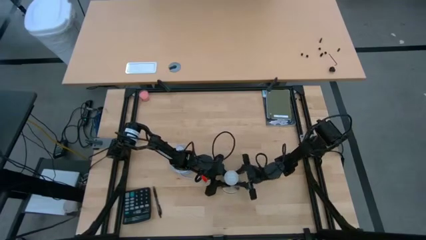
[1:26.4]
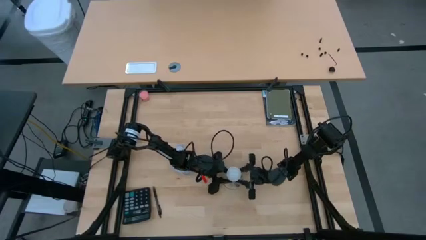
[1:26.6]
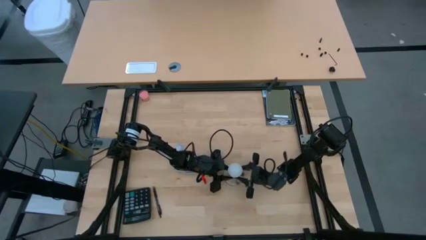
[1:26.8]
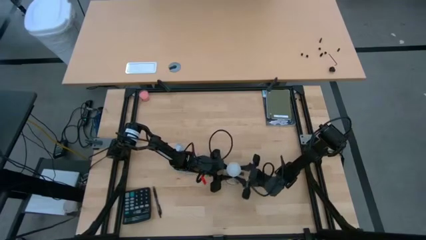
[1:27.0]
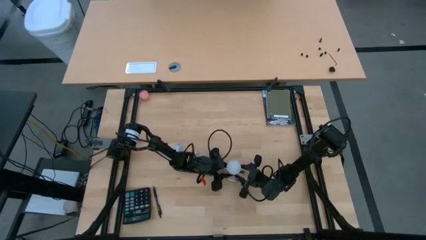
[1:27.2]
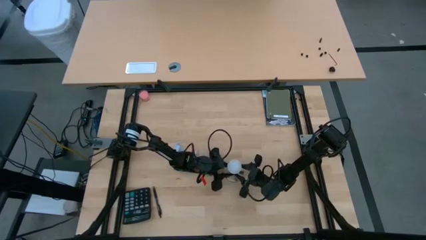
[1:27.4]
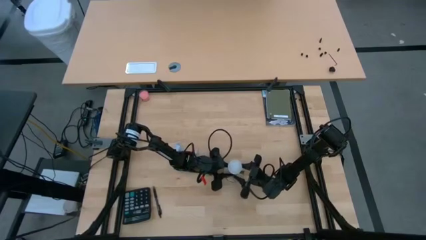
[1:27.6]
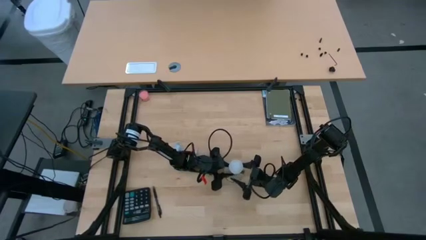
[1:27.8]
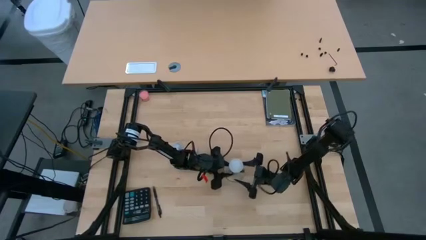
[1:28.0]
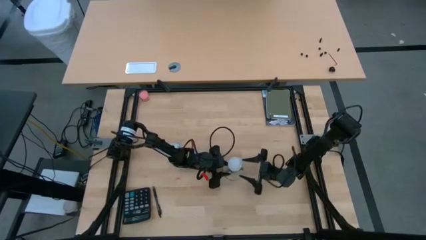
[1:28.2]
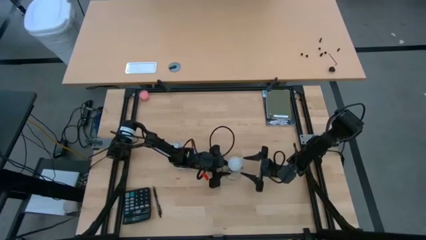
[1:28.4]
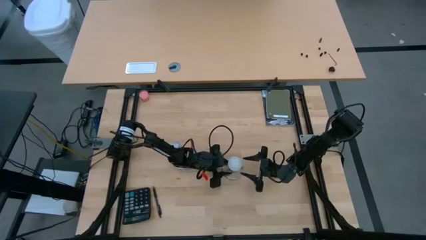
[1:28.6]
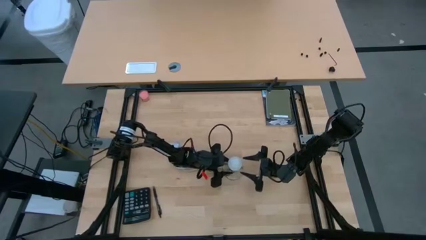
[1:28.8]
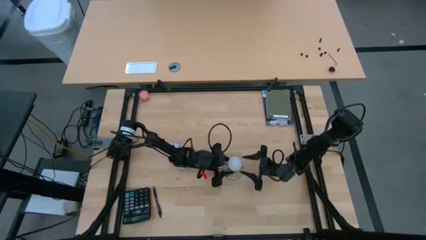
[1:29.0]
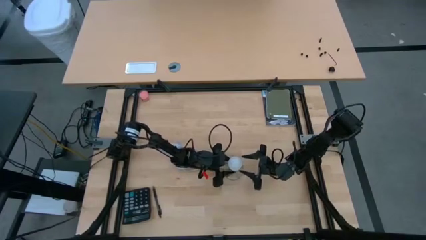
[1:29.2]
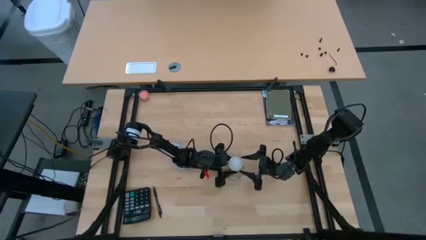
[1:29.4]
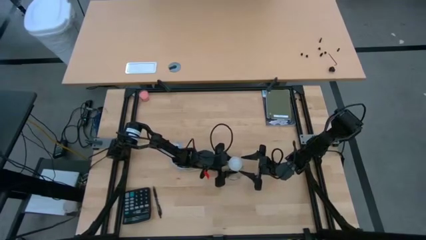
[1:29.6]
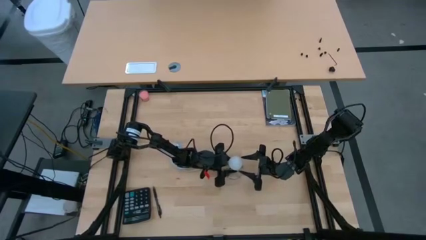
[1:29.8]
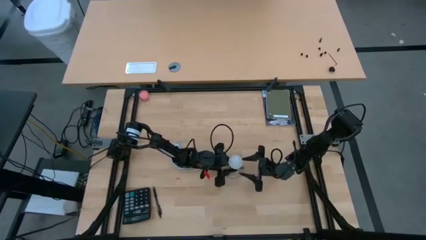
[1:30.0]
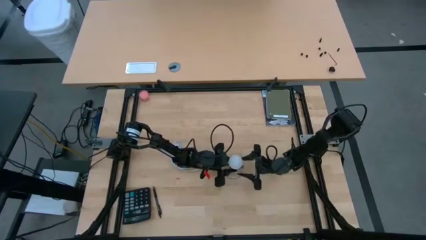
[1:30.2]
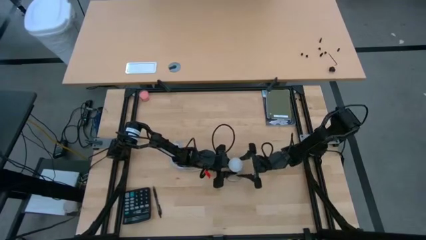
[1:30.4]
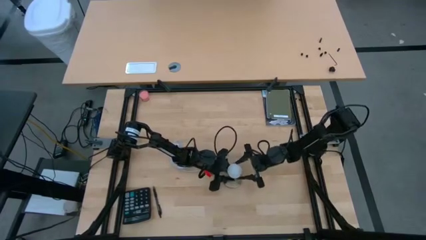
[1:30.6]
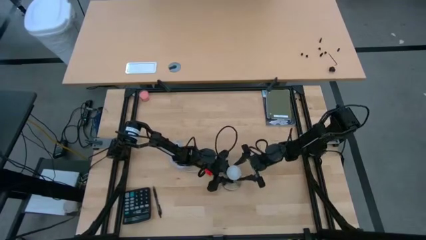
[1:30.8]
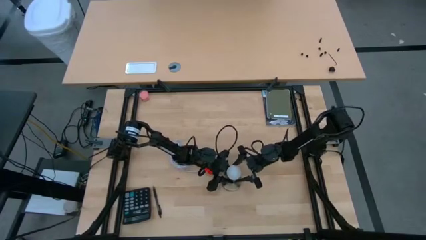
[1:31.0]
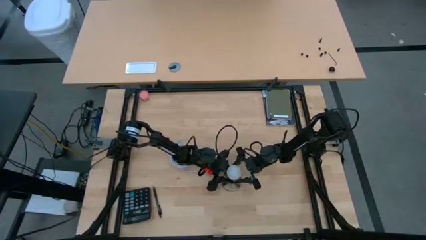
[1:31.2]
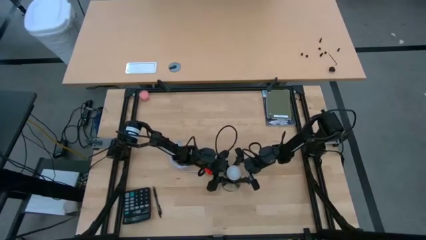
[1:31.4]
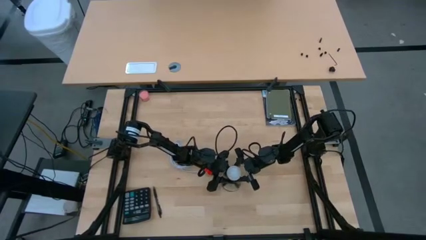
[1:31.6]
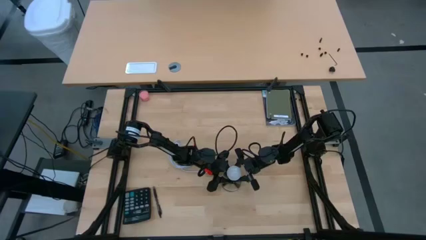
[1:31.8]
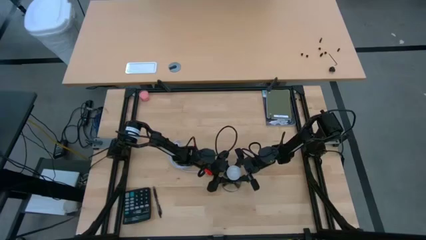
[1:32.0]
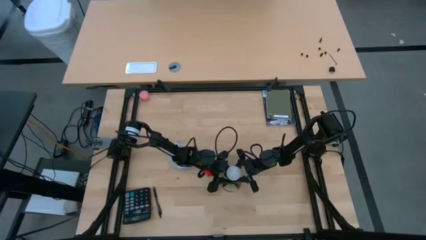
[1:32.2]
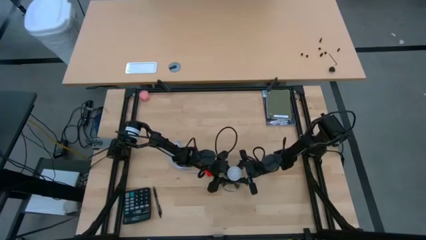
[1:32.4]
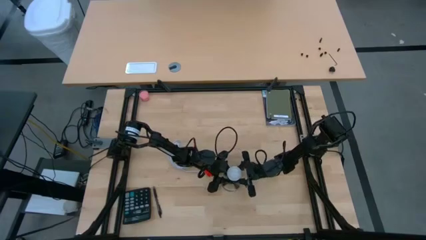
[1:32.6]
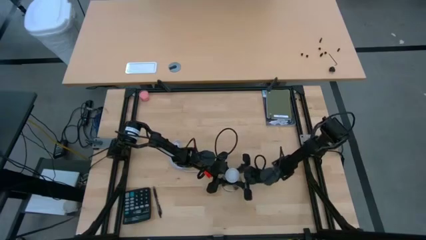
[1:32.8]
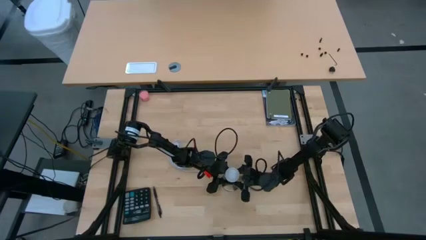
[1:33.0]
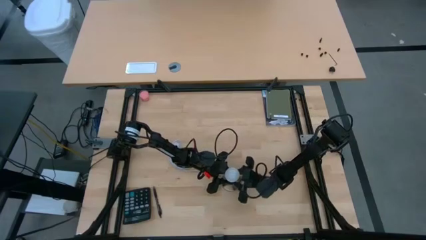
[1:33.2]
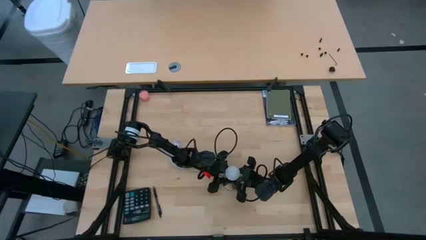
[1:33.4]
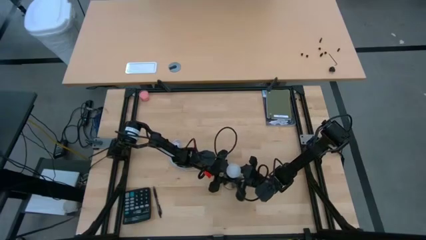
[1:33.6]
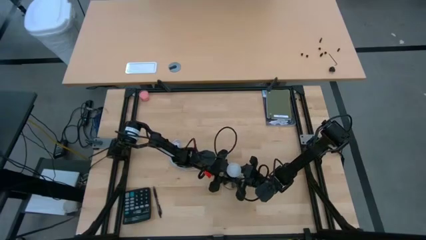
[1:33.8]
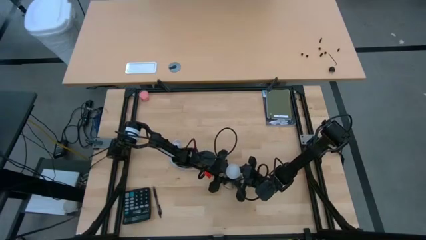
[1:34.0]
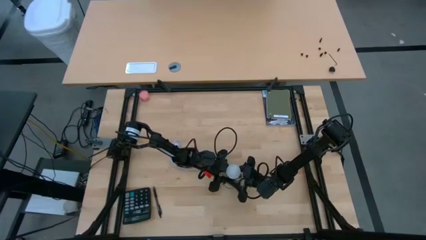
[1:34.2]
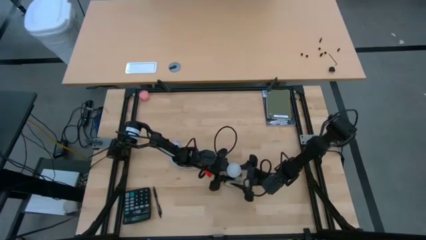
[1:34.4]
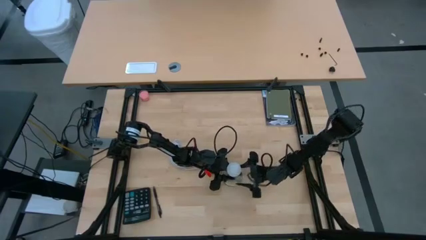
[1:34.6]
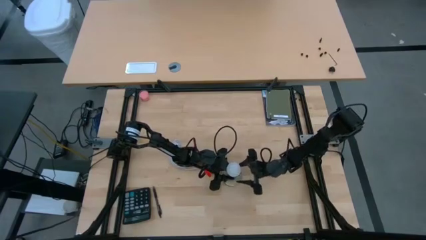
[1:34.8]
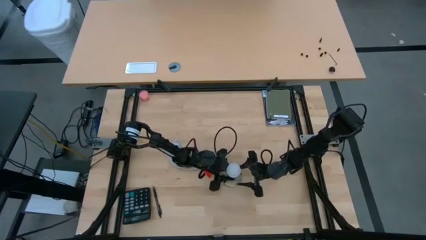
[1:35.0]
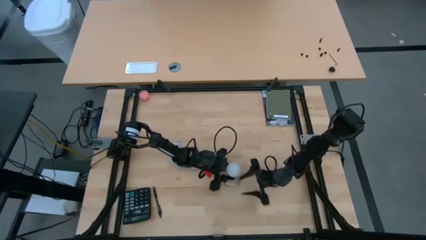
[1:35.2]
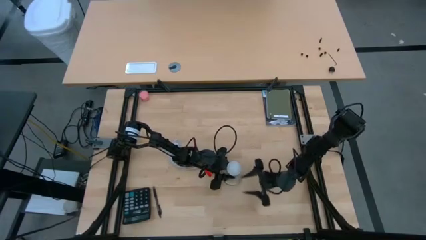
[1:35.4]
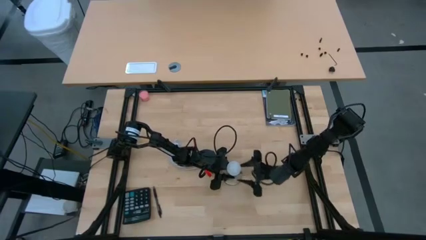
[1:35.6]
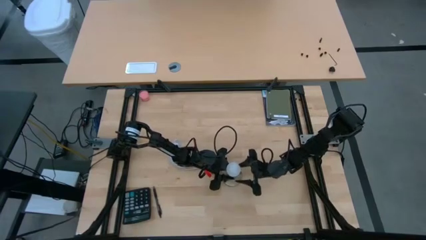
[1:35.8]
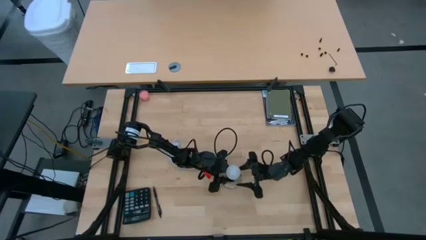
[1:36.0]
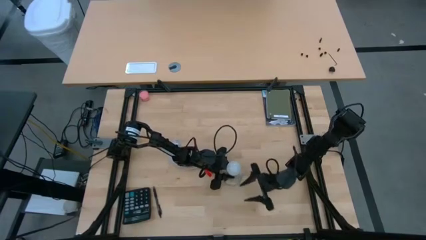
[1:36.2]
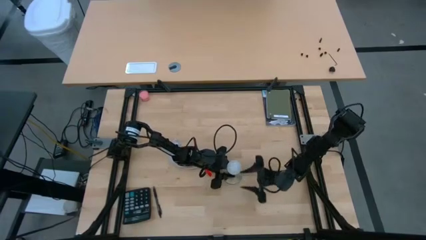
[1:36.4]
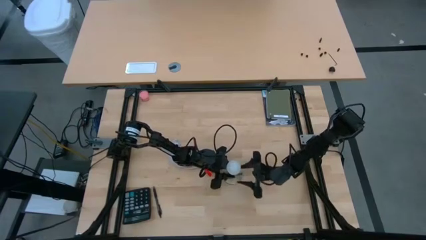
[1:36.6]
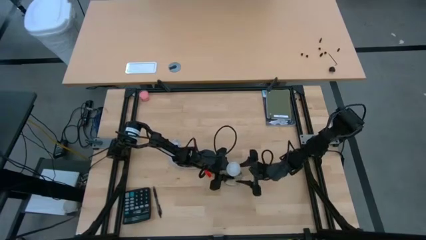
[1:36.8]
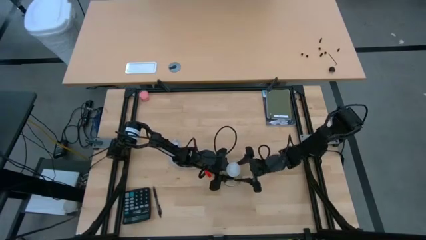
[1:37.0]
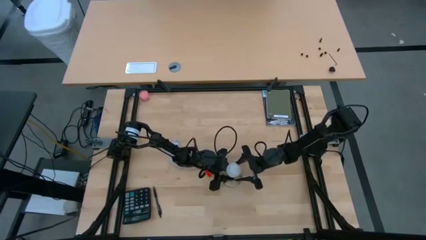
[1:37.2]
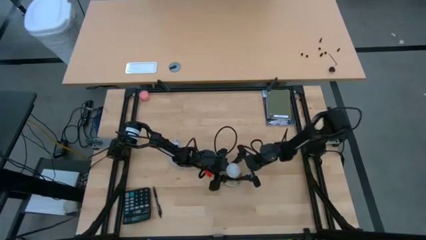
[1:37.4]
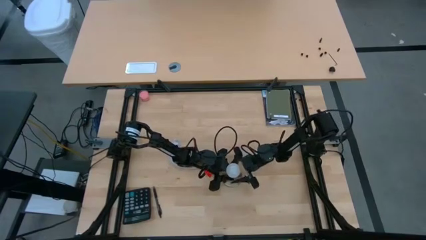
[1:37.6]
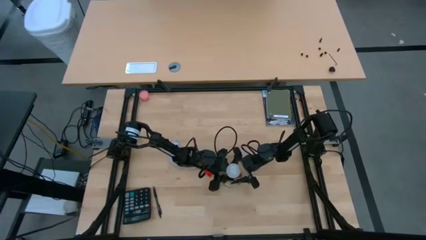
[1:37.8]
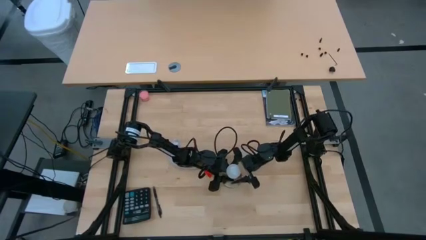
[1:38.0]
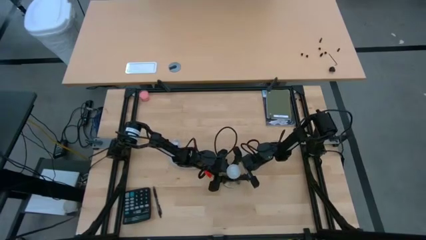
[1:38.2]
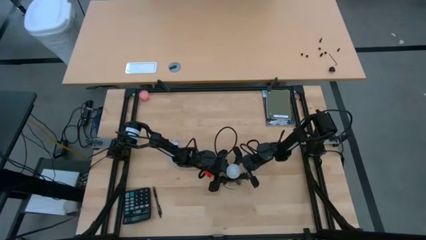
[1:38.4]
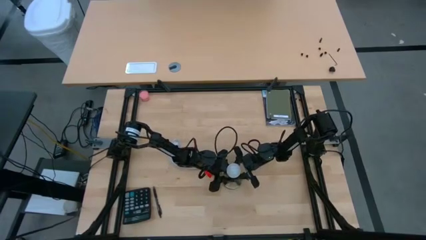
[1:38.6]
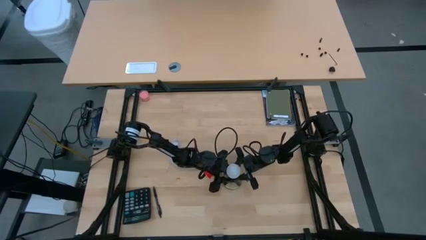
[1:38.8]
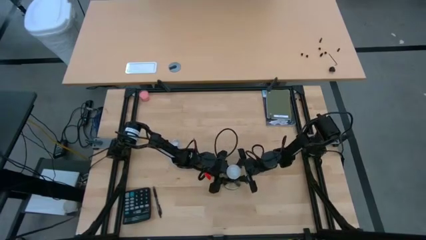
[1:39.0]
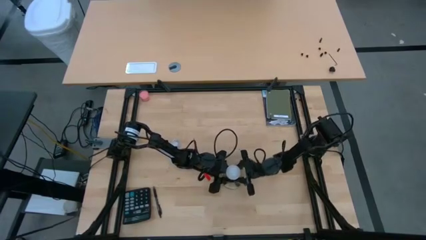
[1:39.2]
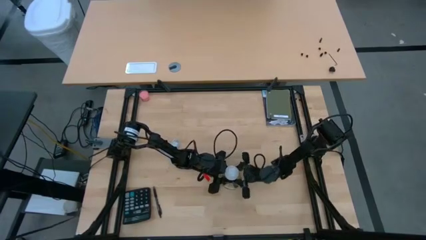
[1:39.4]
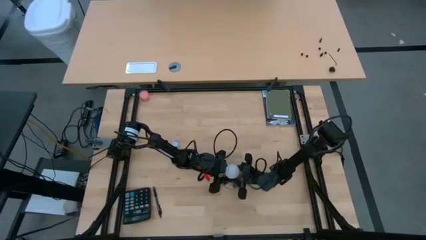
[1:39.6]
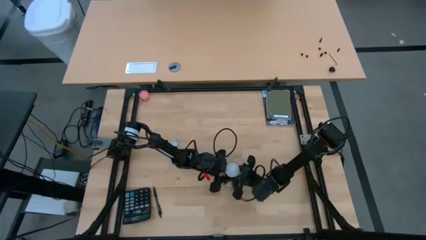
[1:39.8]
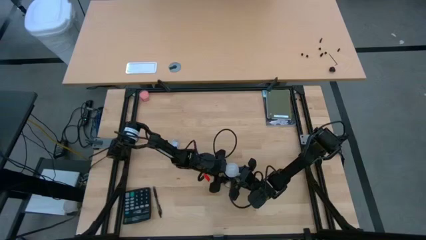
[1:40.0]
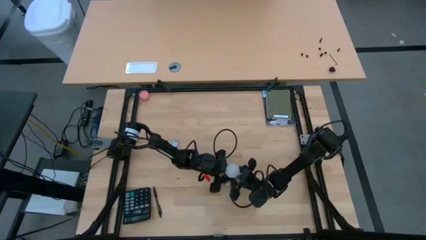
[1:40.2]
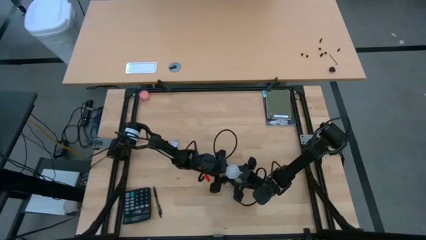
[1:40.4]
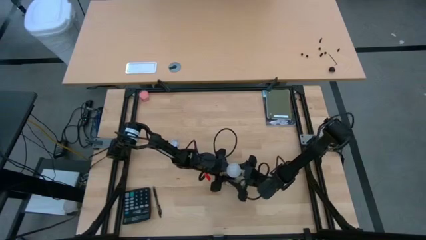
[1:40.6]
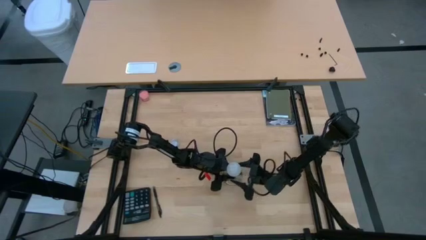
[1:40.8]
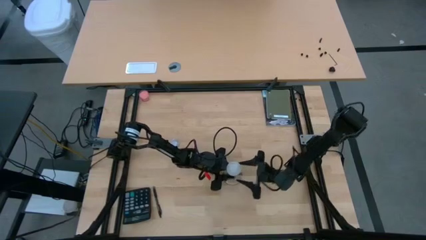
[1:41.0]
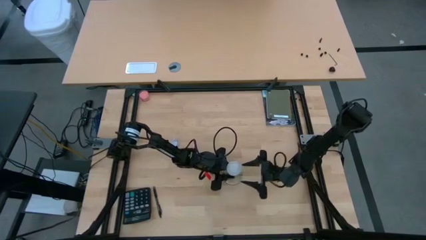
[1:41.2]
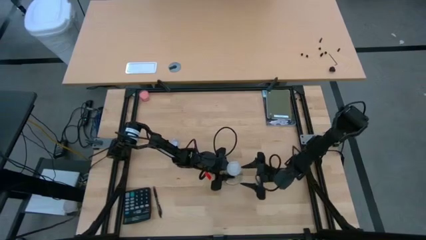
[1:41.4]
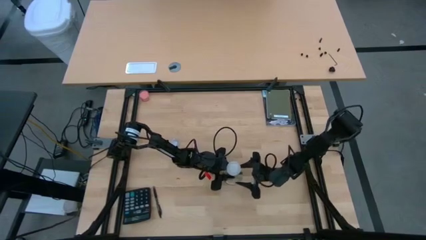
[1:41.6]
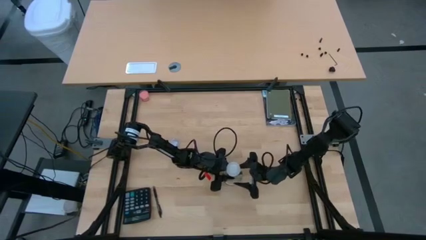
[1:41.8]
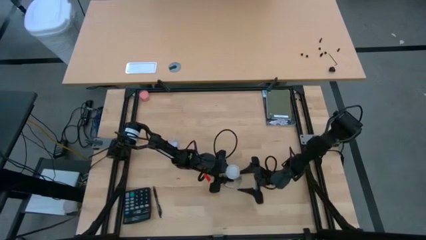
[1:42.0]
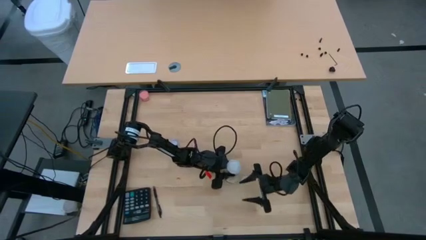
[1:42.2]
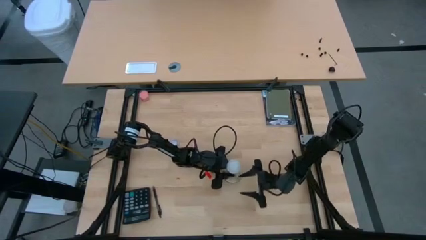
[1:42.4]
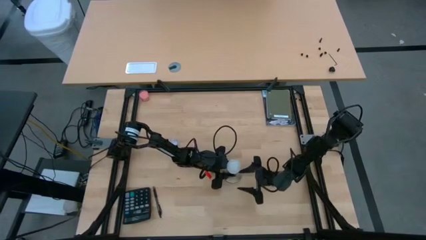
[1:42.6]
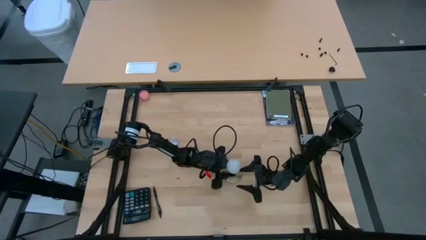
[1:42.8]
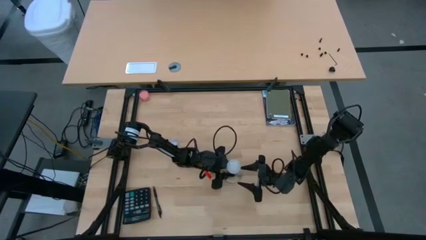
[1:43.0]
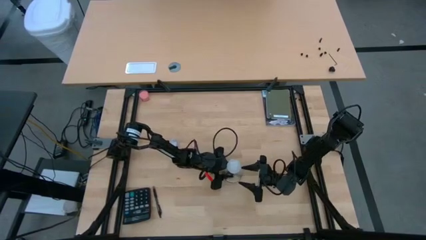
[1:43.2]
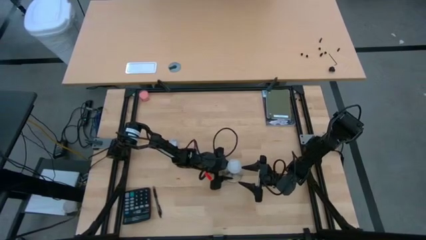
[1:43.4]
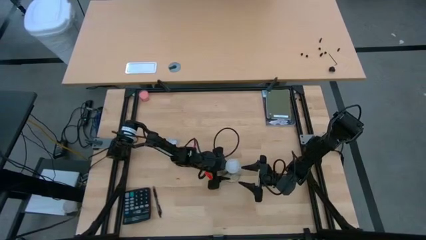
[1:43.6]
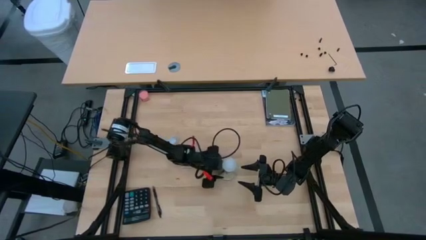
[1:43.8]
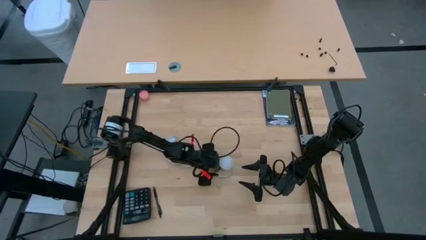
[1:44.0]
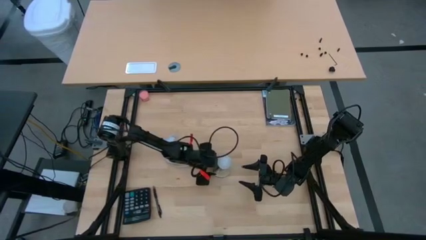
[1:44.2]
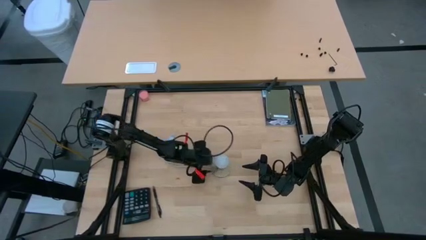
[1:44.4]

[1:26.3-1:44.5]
Task: Screw lightbulb
Insert the lightbulb into the lamp
